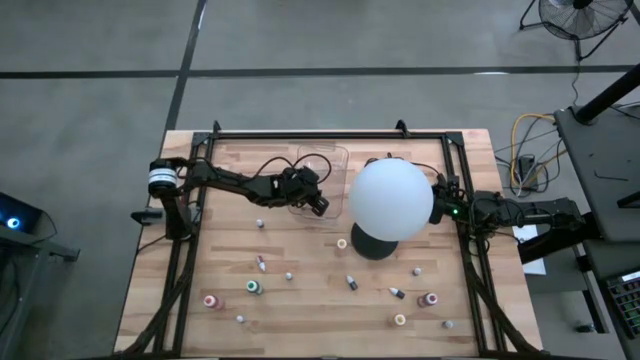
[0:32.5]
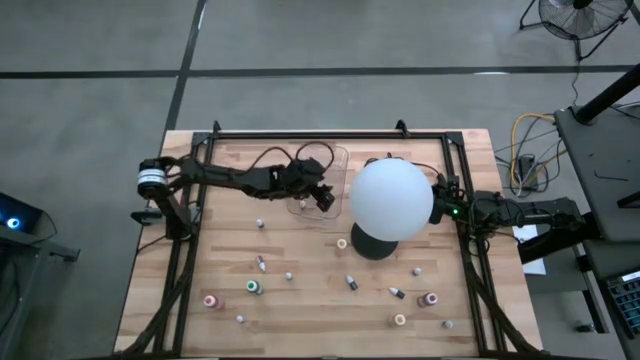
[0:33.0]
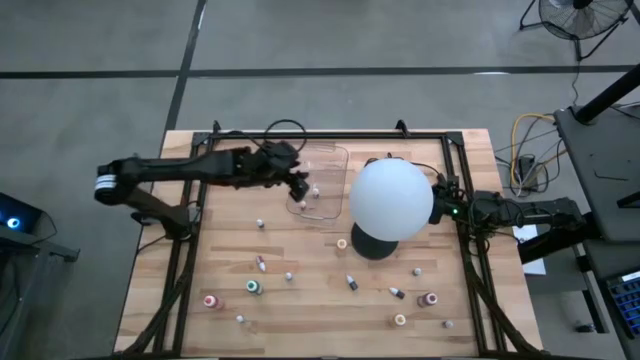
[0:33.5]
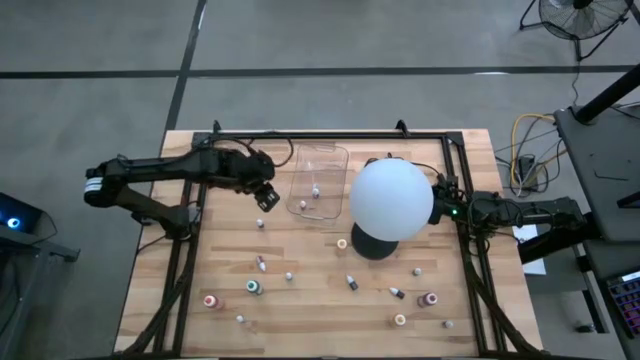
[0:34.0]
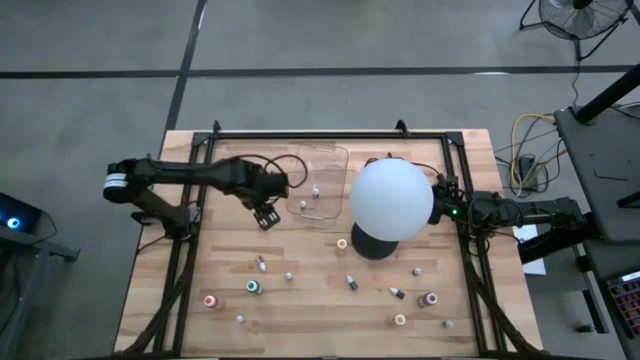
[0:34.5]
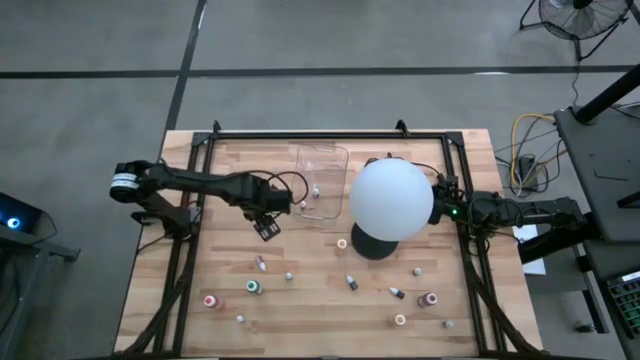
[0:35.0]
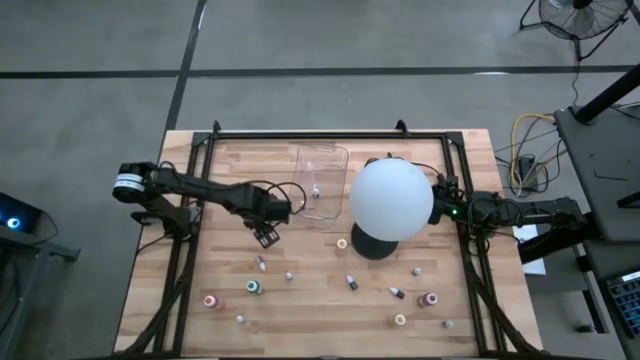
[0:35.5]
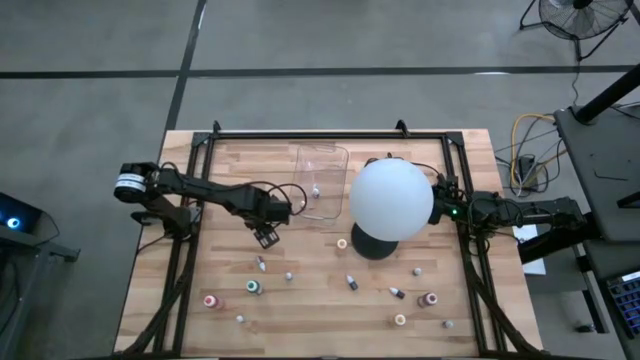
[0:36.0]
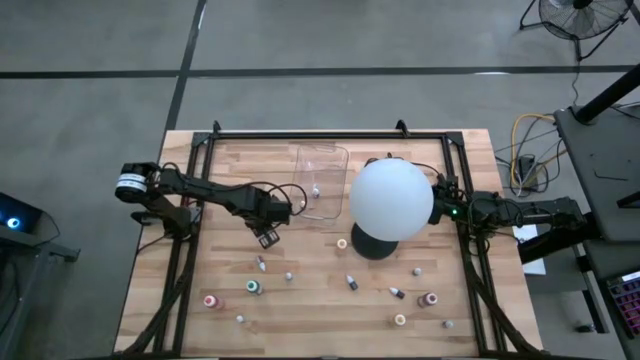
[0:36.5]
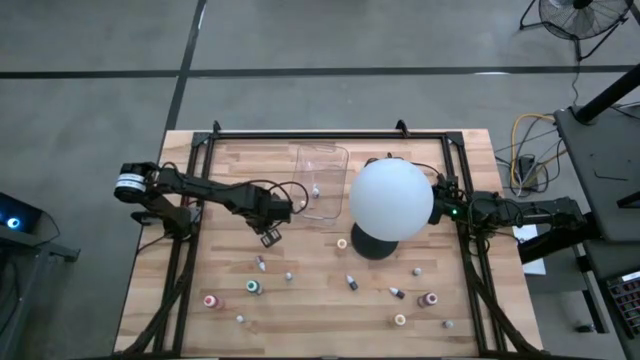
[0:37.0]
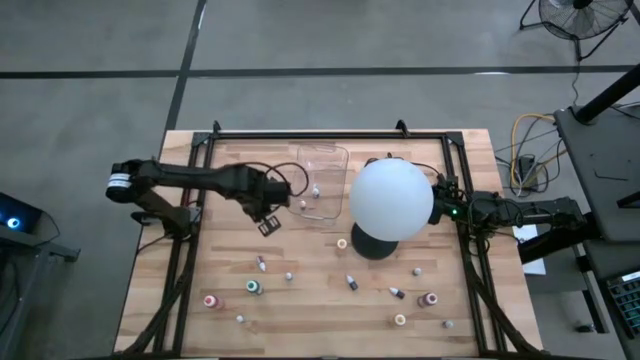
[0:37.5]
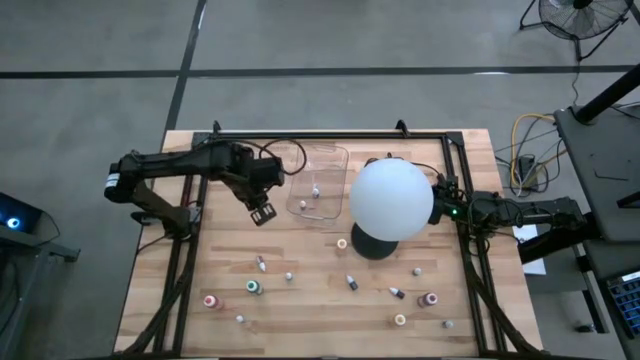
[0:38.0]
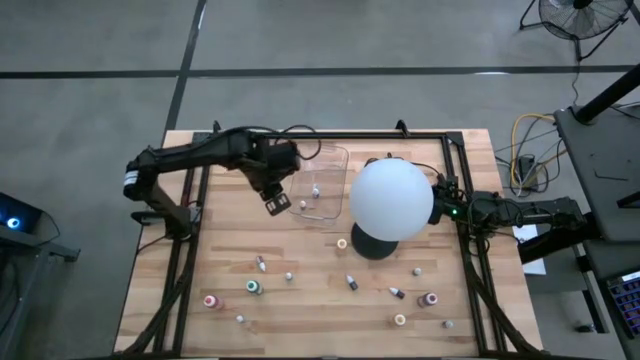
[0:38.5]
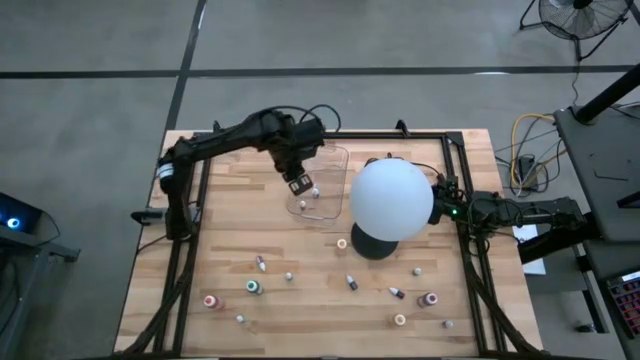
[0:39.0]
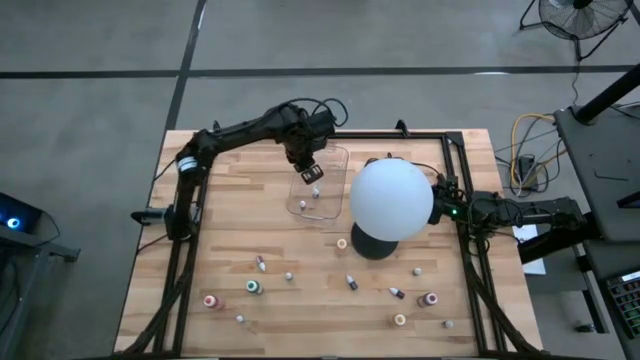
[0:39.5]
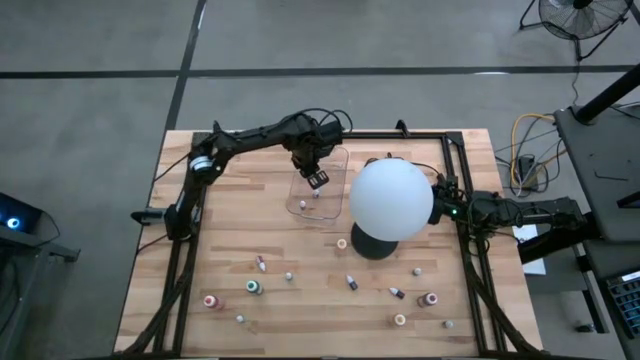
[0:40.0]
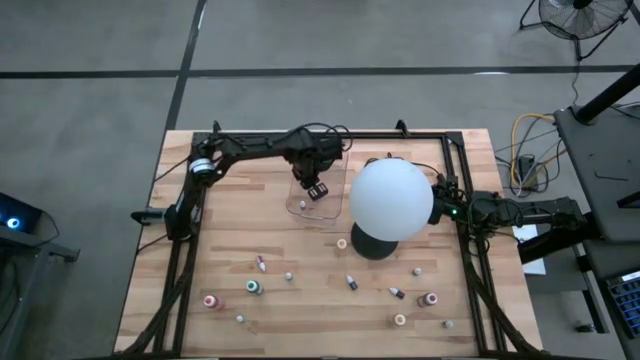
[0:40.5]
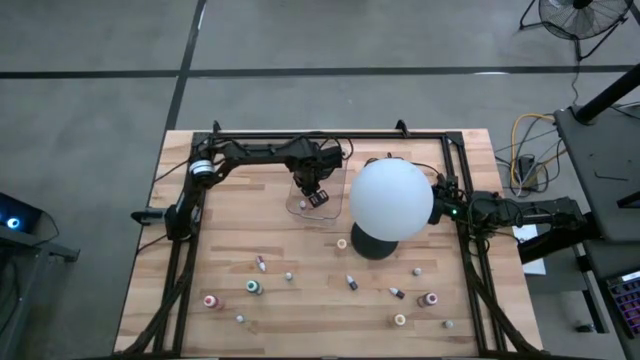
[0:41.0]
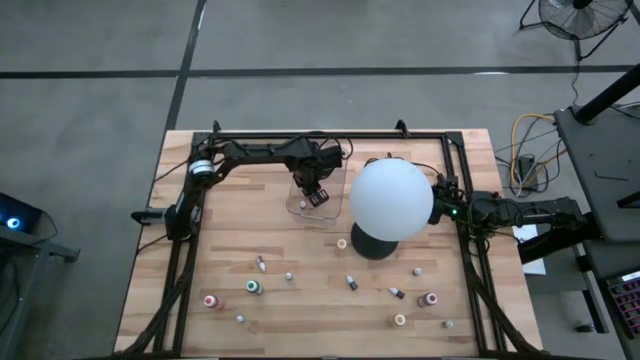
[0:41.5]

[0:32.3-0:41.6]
Task: Pick & Place food coloring
Put the small purple food coloring bottle into the transparent bin

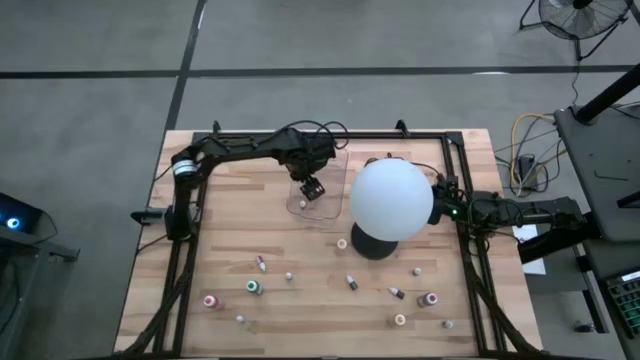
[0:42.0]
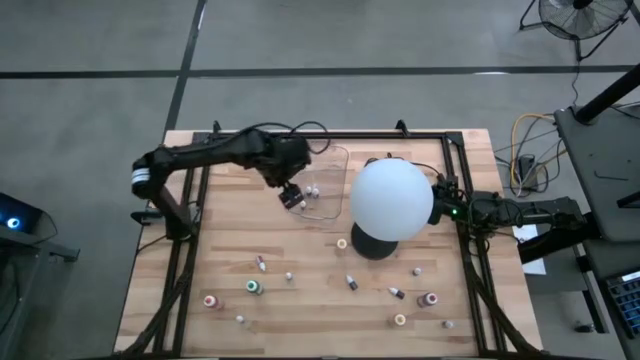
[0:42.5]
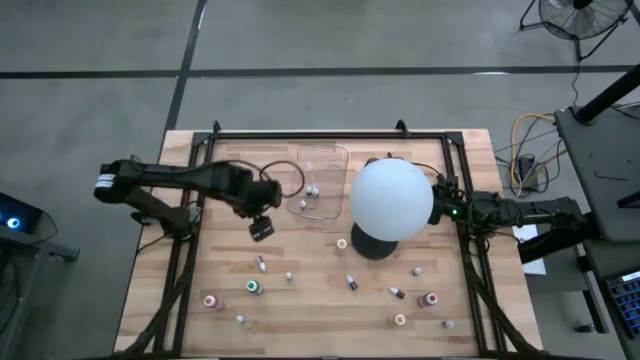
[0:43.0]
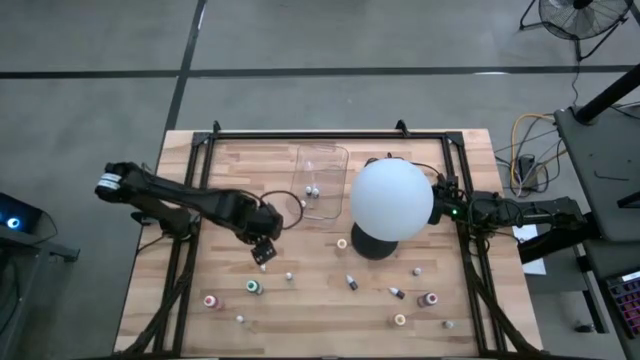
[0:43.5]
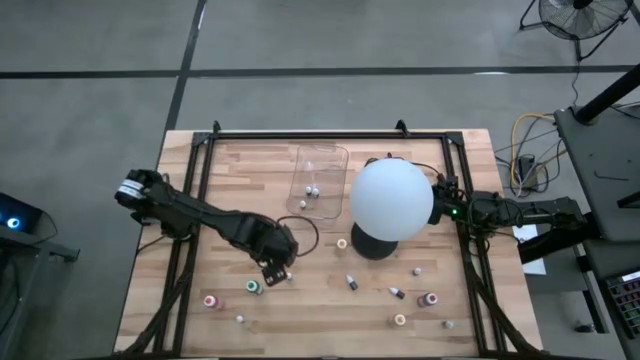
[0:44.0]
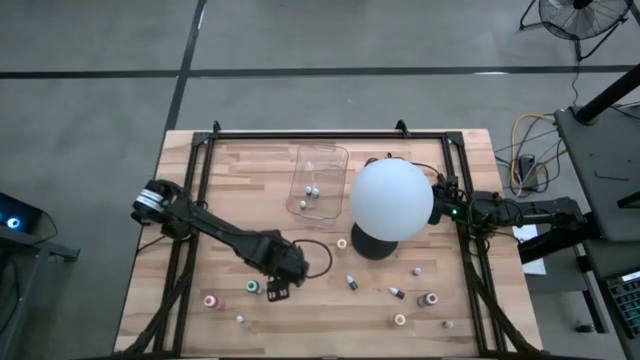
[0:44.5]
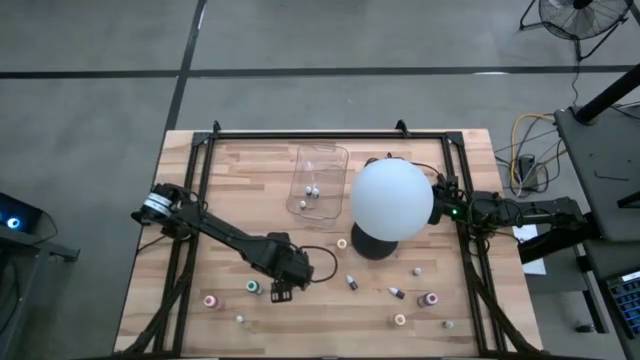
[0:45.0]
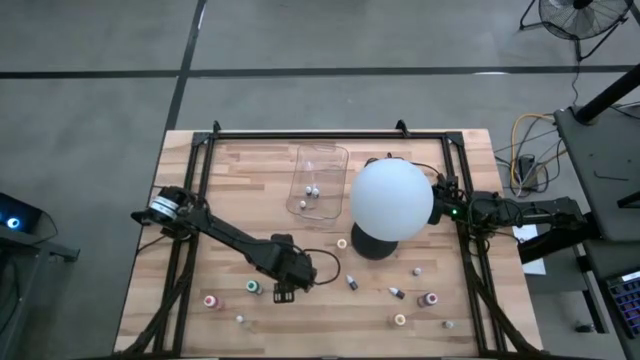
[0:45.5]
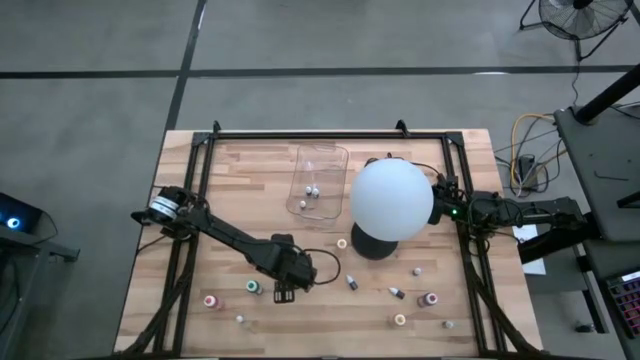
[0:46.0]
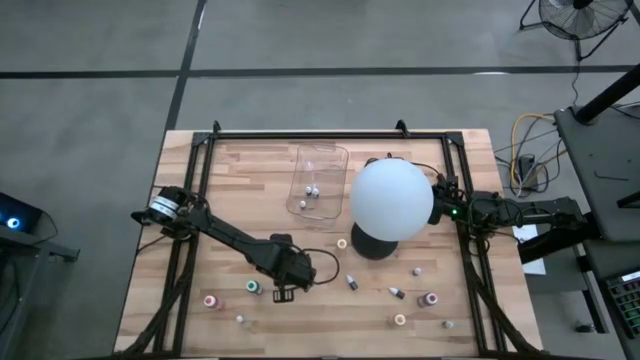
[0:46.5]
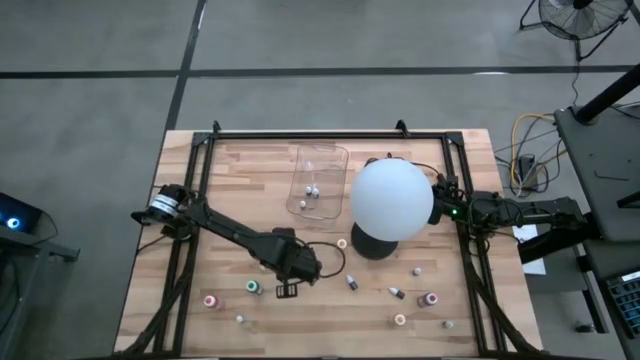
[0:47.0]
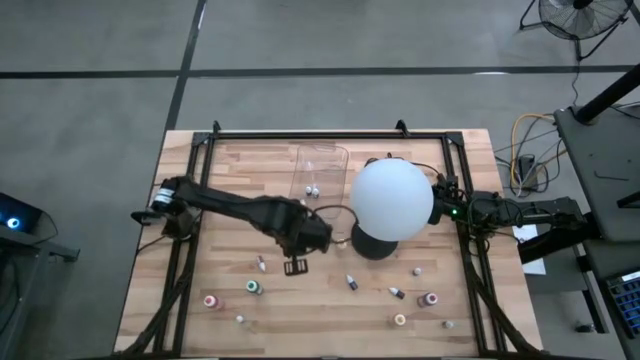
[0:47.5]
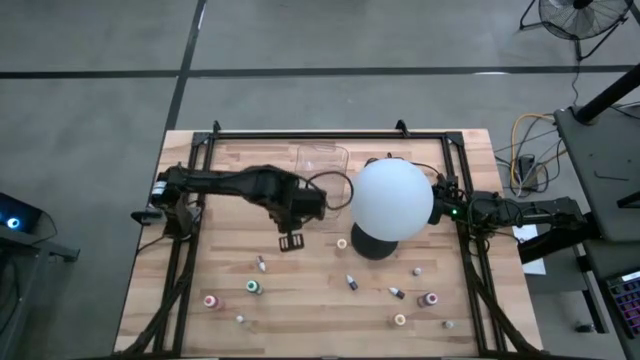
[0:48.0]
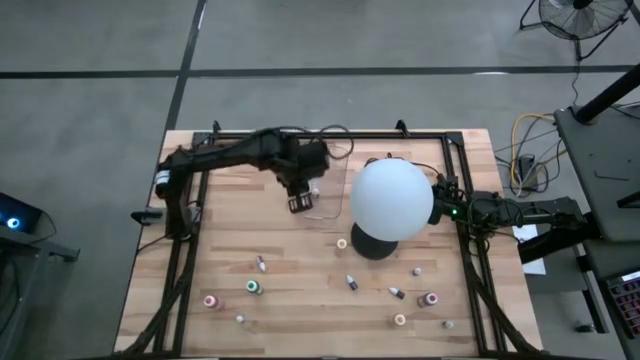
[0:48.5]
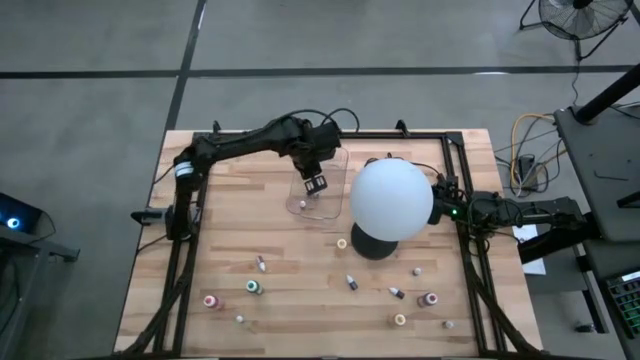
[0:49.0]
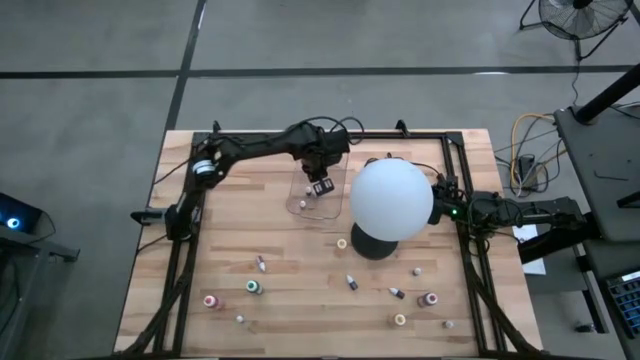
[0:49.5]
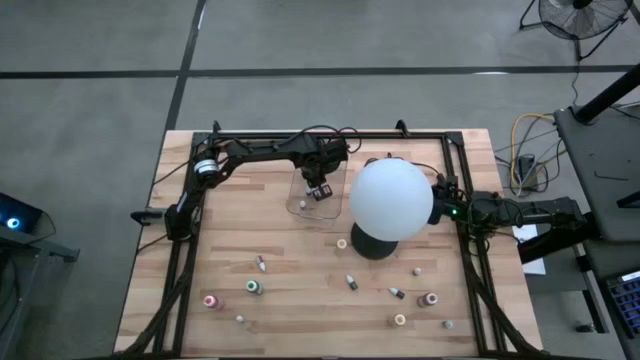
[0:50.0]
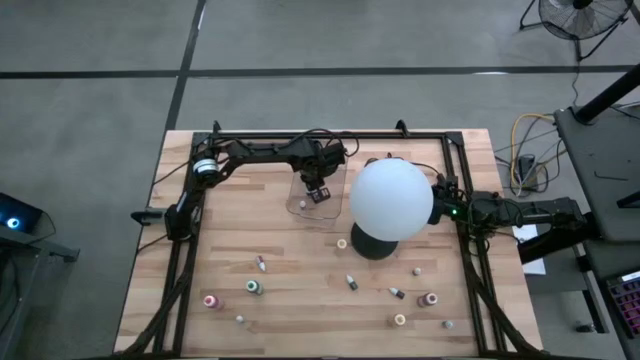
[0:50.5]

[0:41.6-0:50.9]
Put the small green food coloring bottle into the transparent bin
